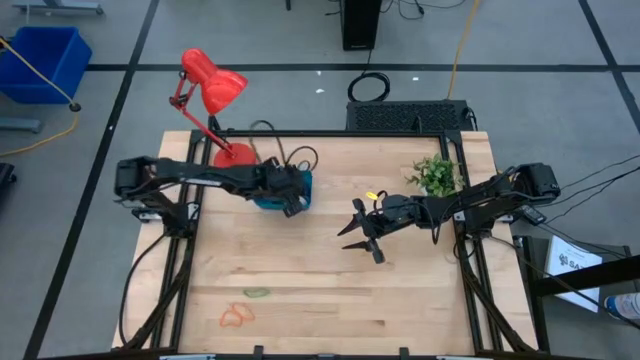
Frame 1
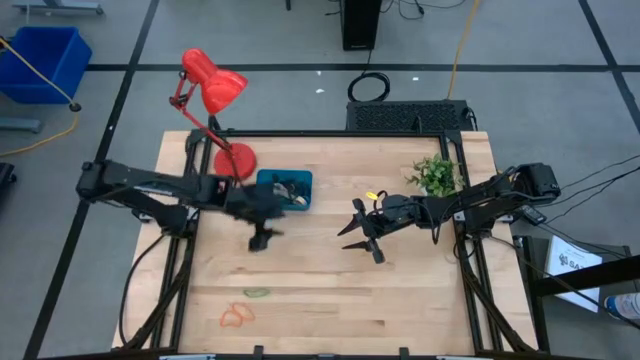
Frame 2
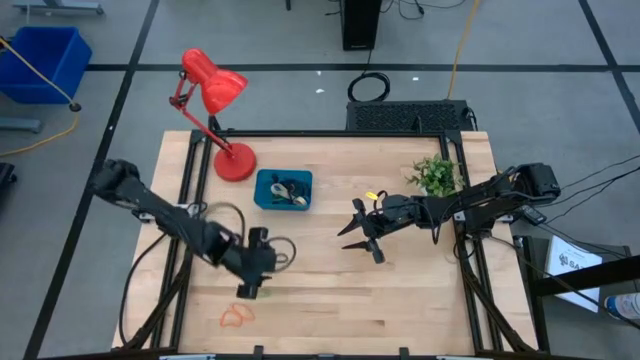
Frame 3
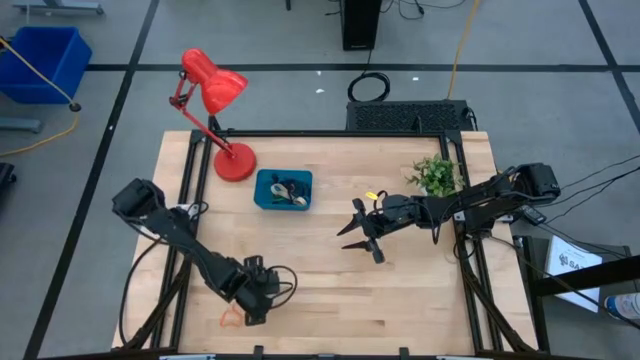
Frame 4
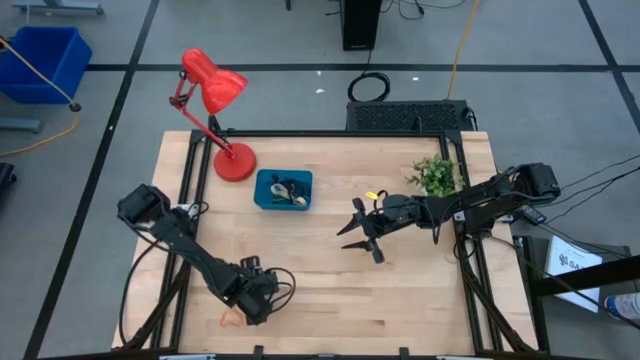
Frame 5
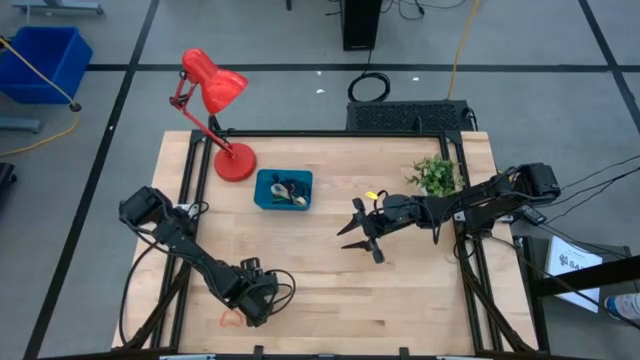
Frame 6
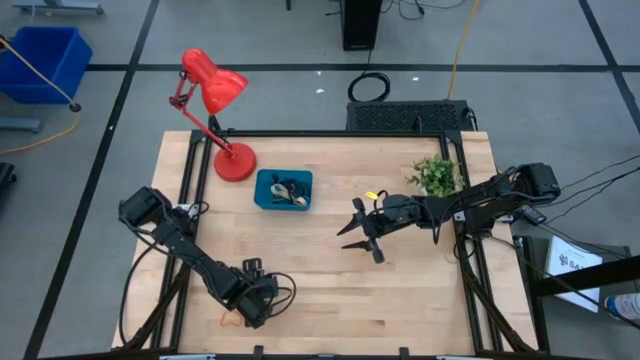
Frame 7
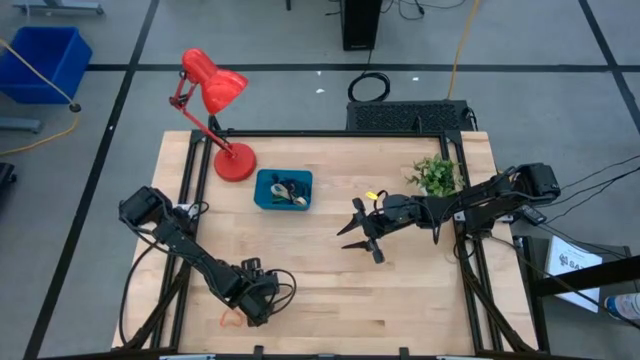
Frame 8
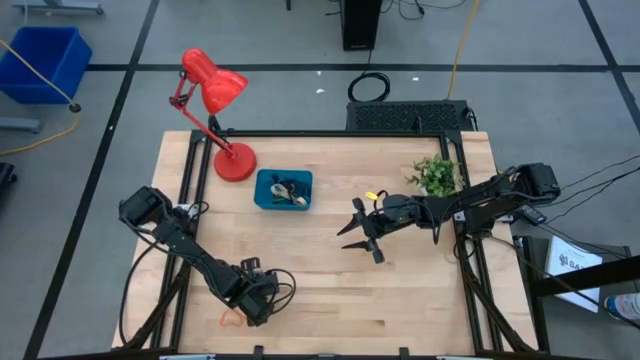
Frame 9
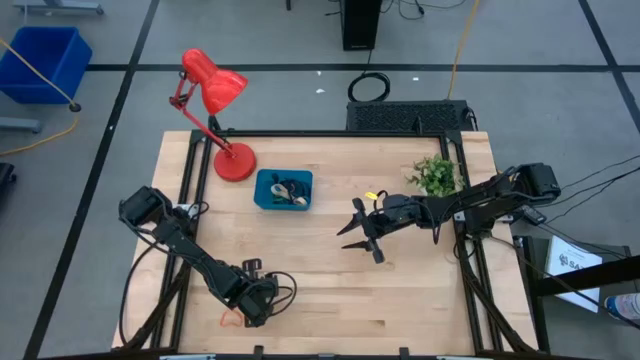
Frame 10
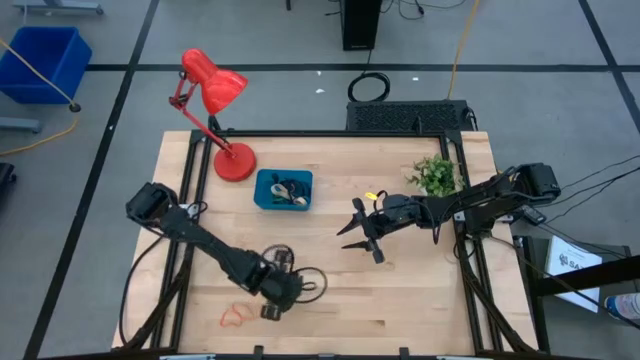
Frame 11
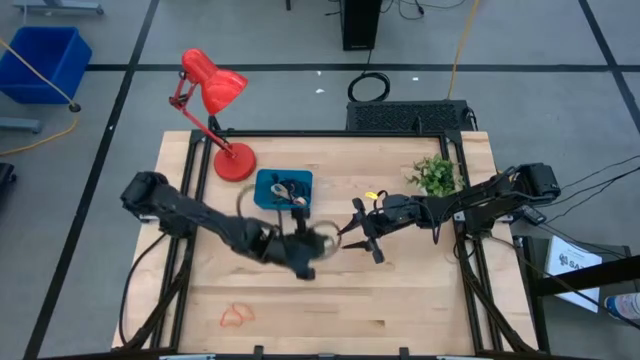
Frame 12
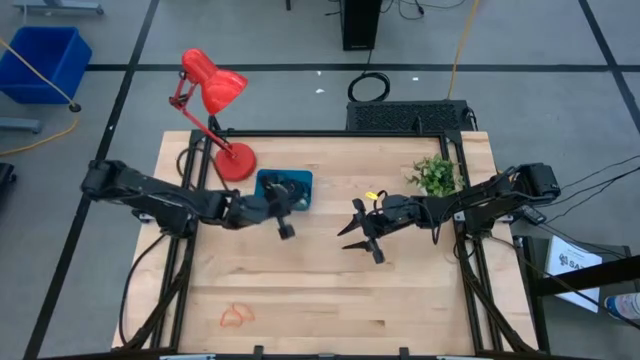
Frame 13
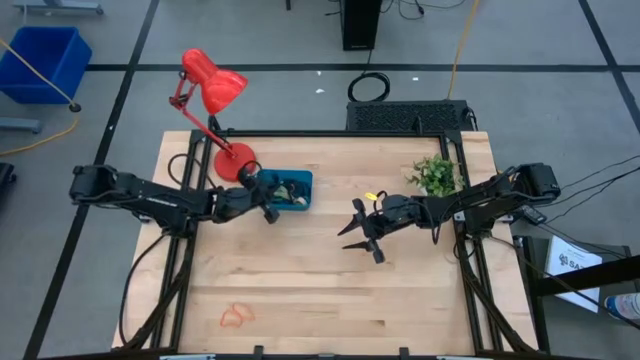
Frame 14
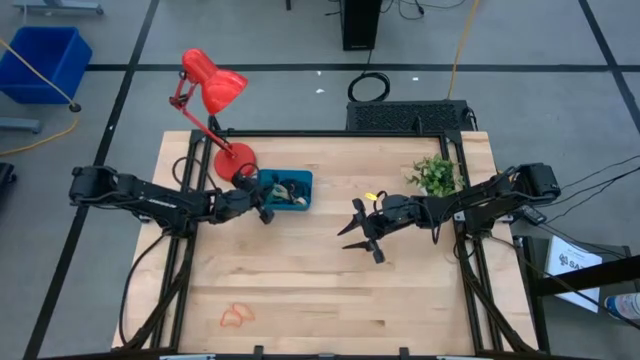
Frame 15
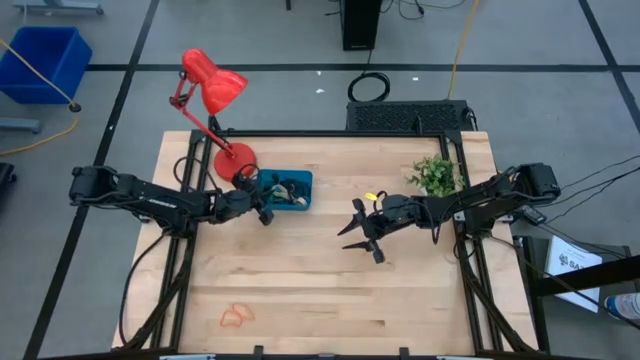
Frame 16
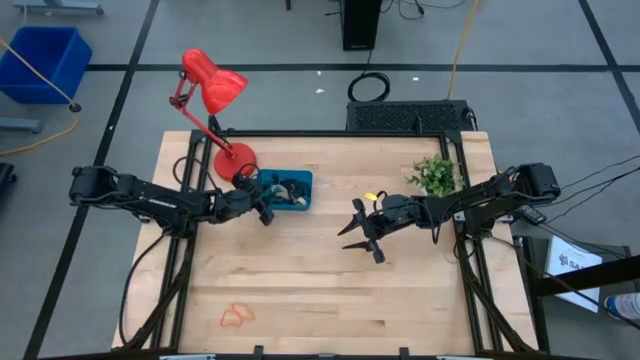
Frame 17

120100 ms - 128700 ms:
Task: Pick and place rubber bands into bin
Put the green rubber band into the blue bin

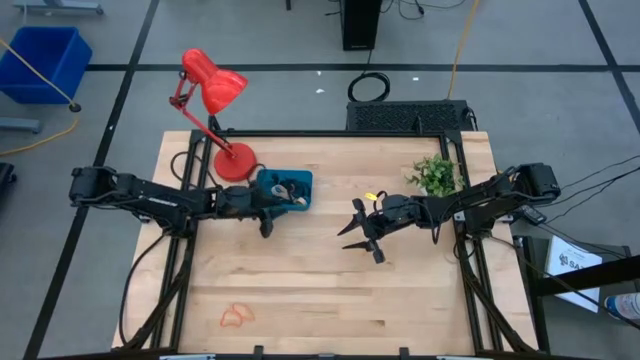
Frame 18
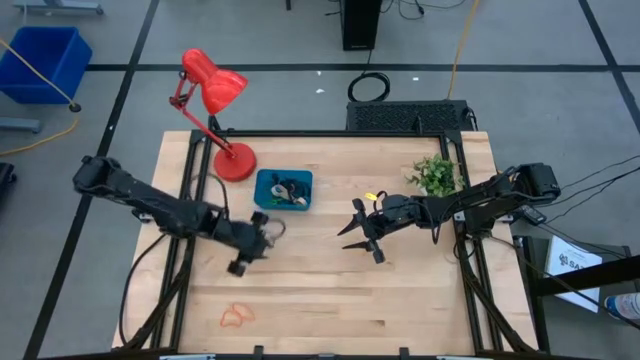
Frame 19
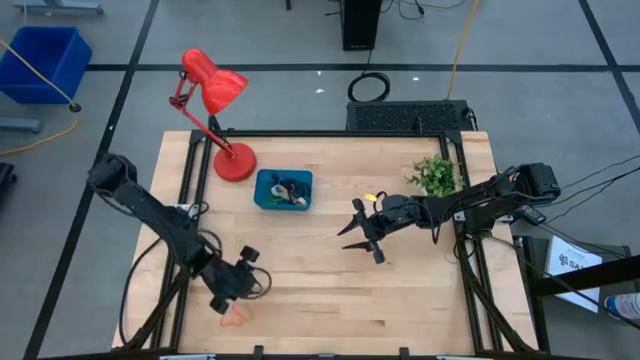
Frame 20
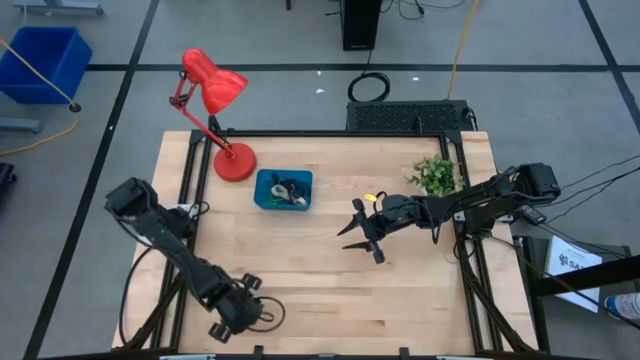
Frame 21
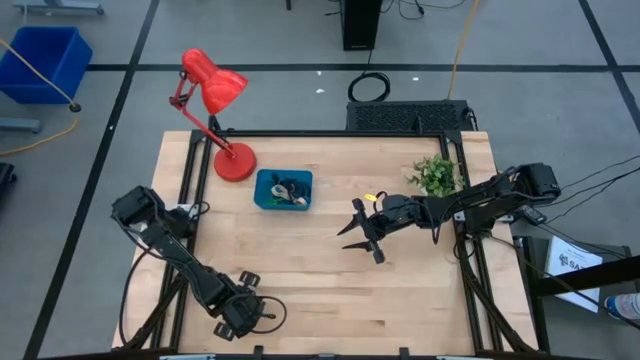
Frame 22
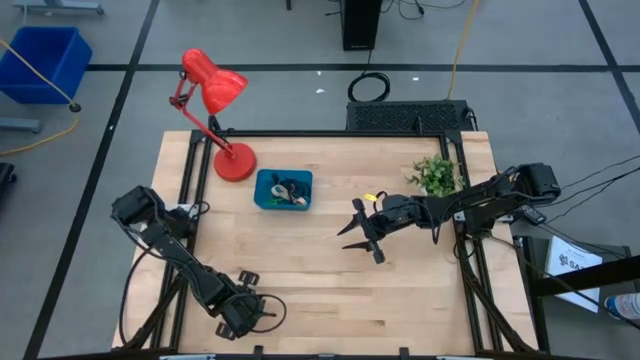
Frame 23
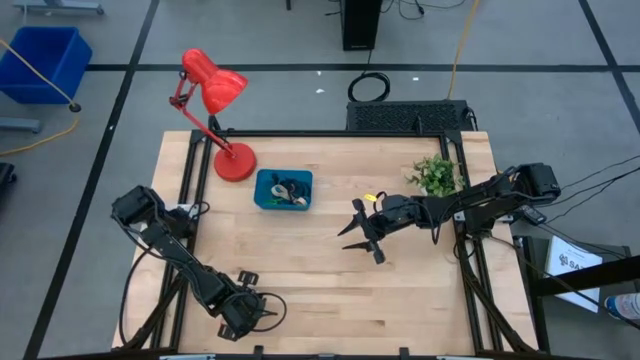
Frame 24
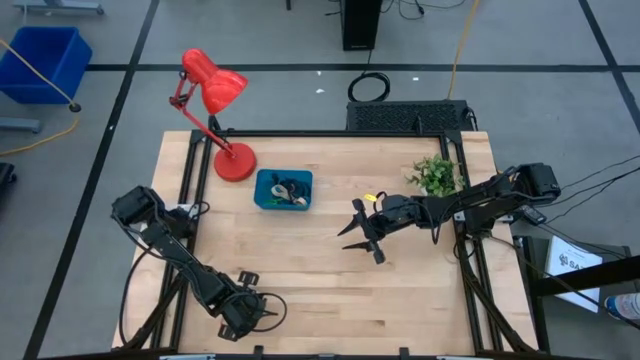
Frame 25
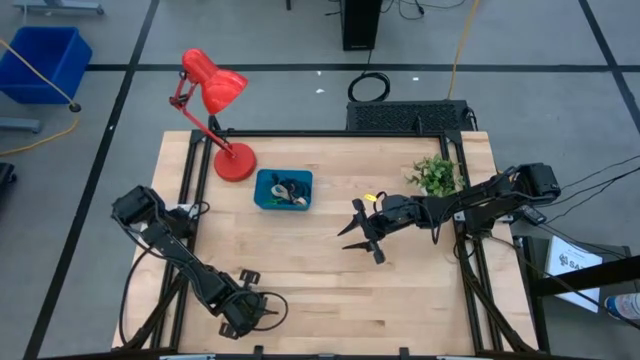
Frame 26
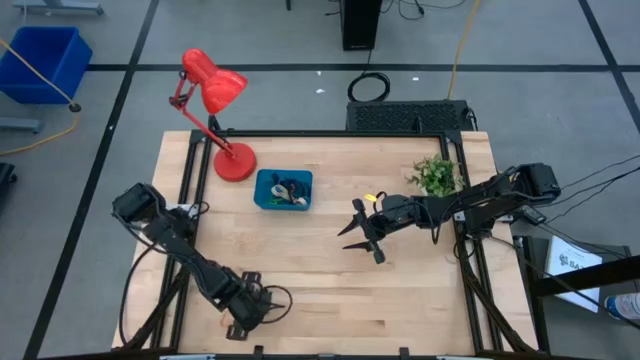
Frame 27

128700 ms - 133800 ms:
Put the orange rubber band into the blue bin

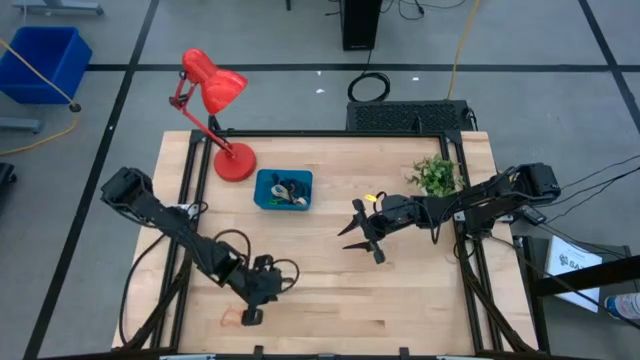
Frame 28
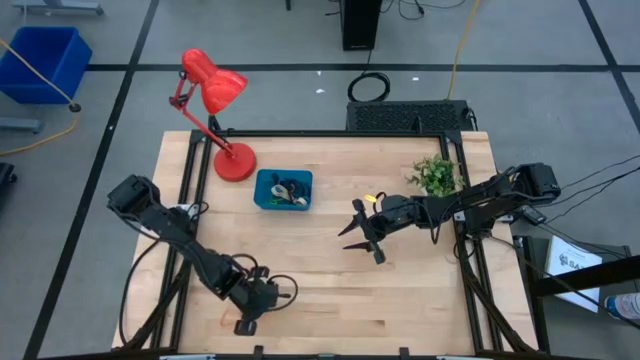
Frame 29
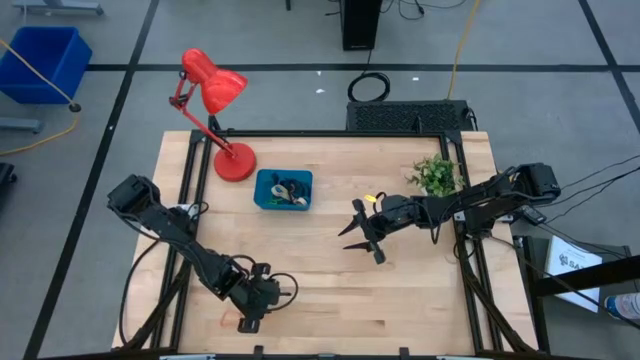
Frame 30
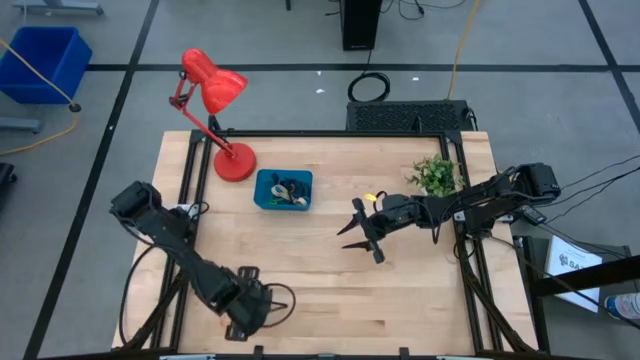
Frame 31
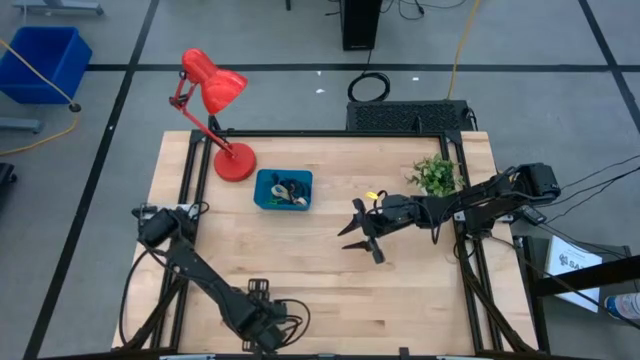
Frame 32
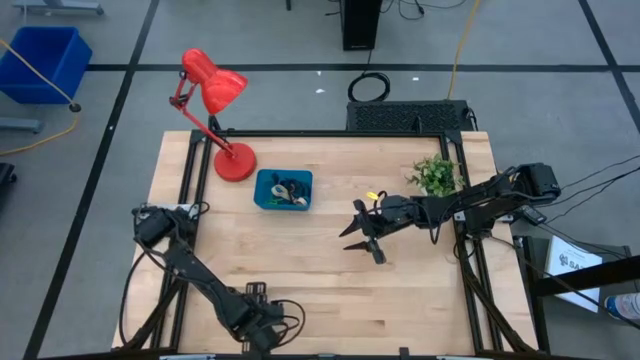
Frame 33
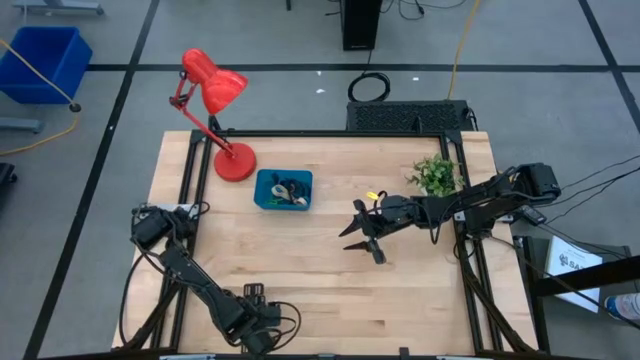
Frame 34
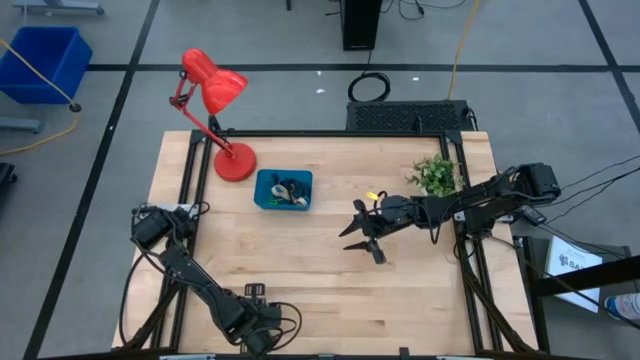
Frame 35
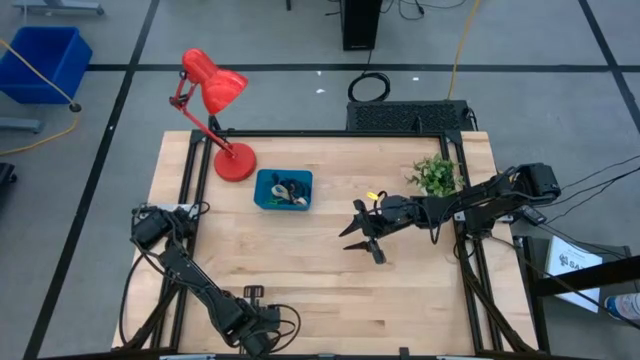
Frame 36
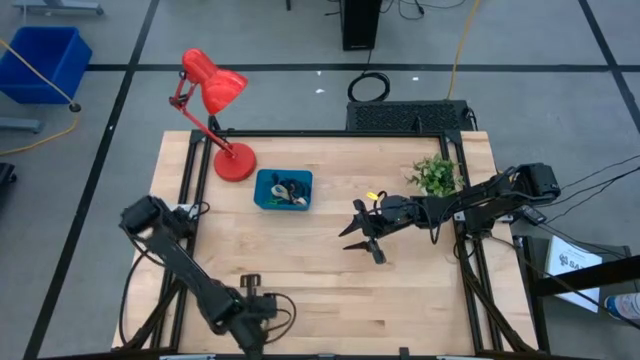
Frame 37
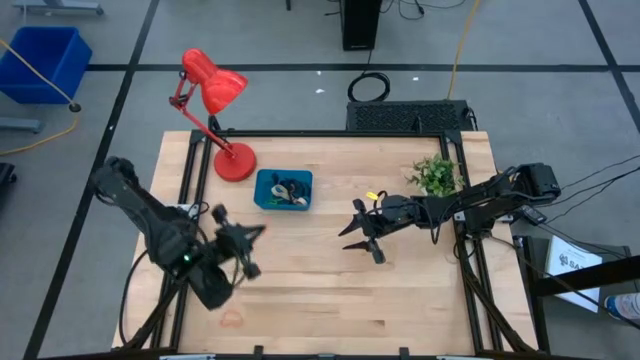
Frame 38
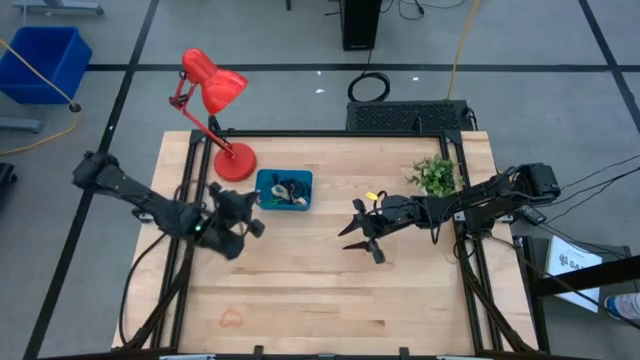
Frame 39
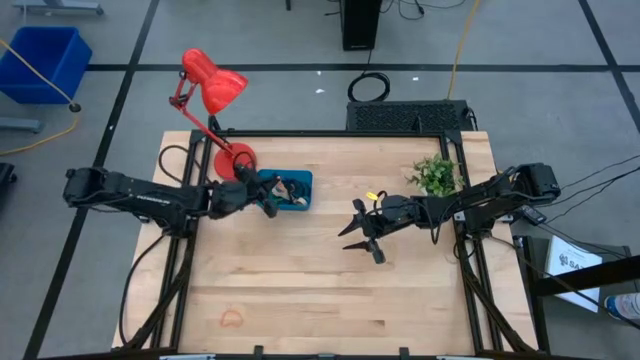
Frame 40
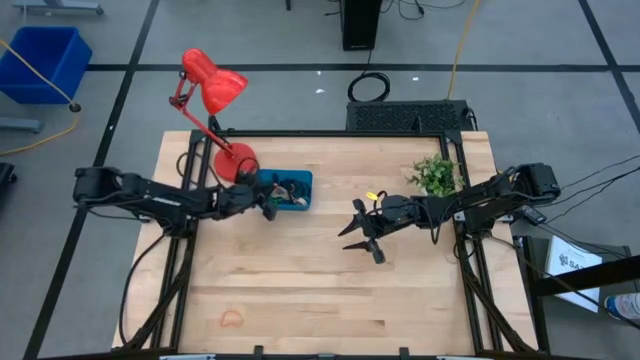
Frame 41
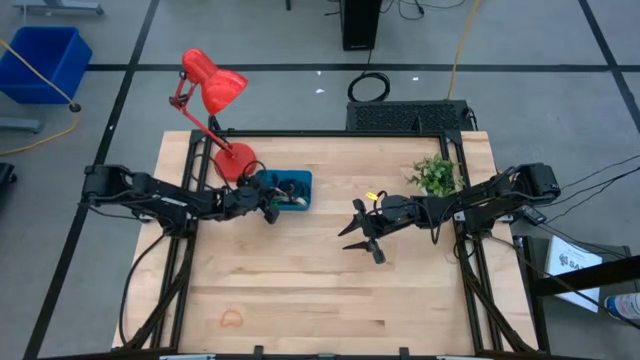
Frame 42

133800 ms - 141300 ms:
Put the orange rubber band into the blue bin
